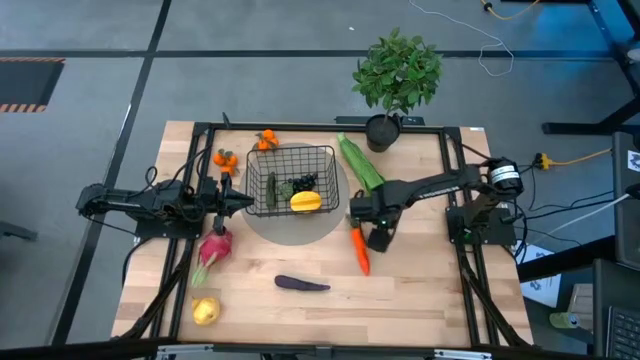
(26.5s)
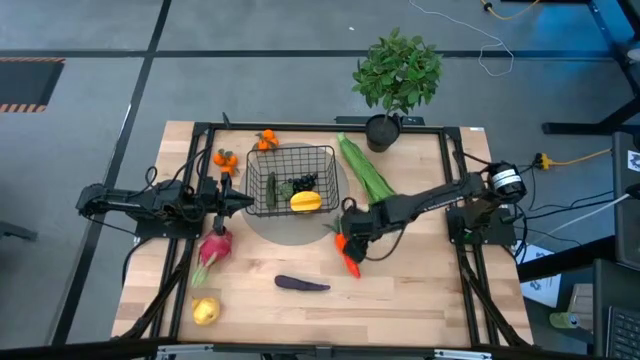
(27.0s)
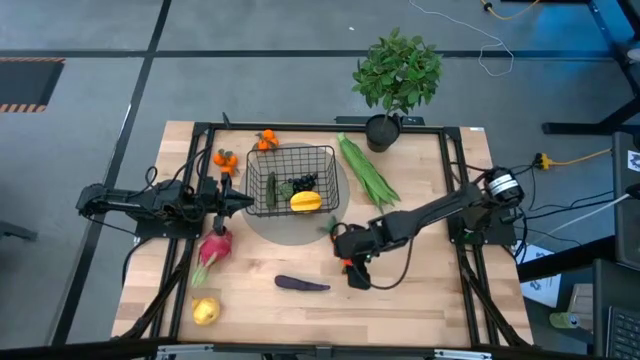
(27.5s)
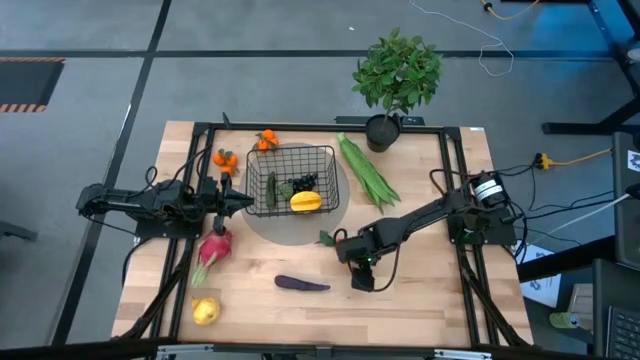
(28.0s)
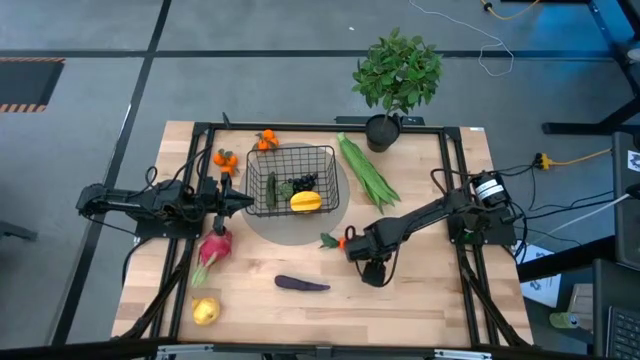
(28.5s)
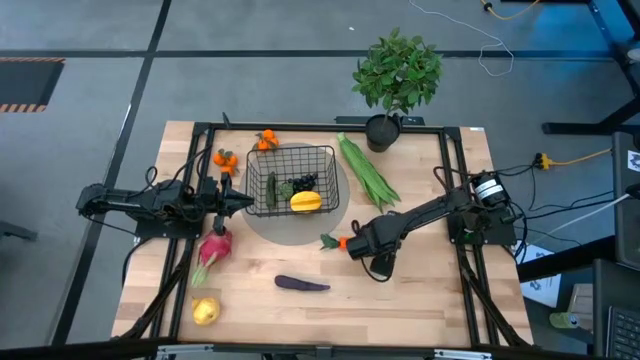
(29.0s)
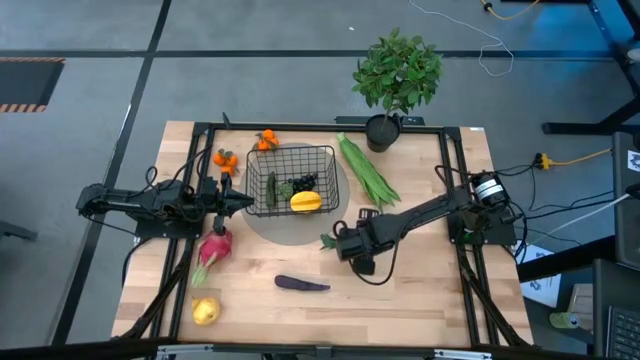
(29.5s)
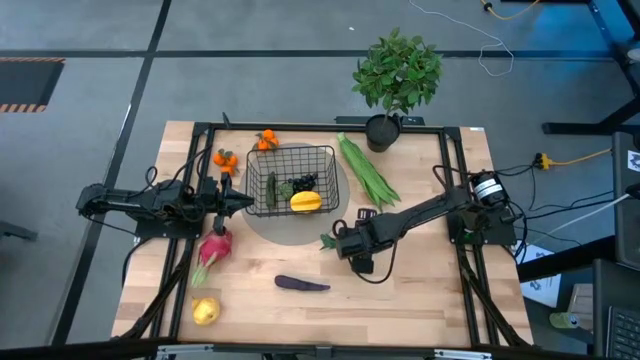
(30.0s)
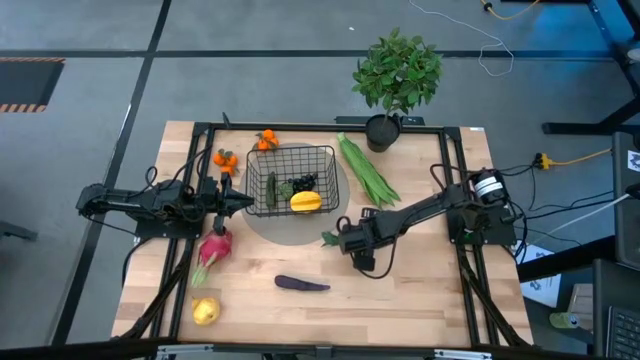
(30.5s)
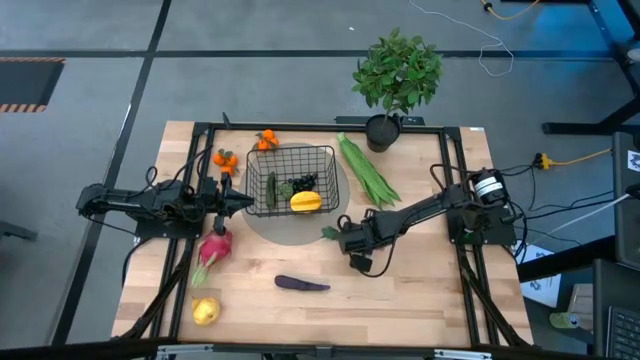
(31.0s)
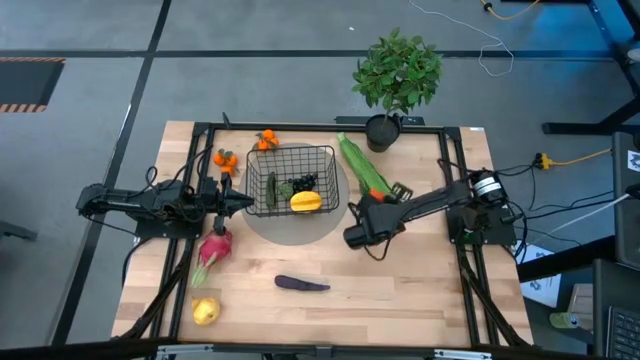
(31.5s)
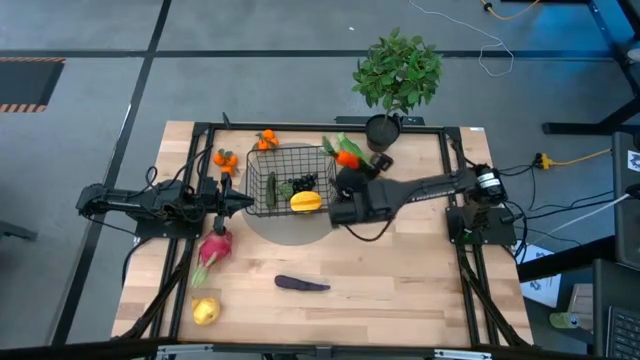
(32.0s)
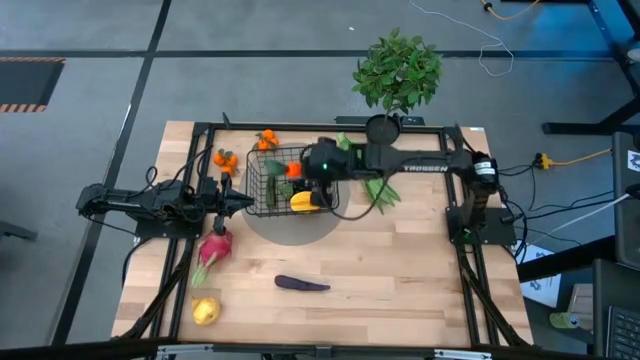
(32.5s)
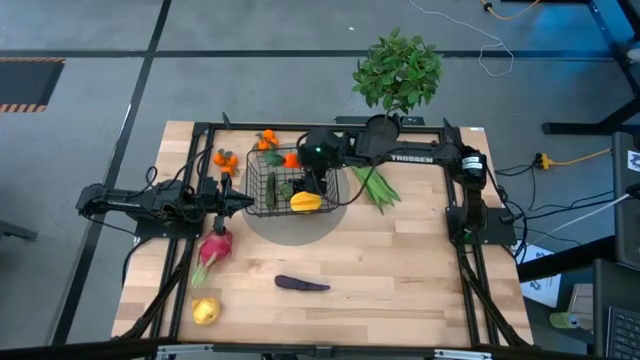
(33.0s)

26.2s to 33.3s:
Task: Build produce basket
Put the orange carrot into the black wire basket

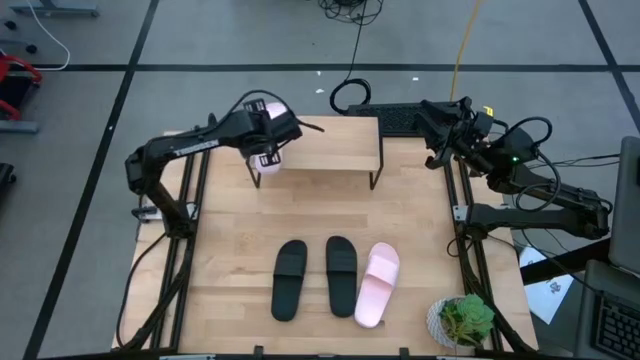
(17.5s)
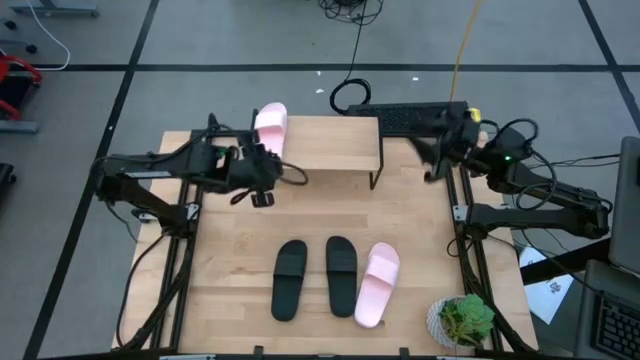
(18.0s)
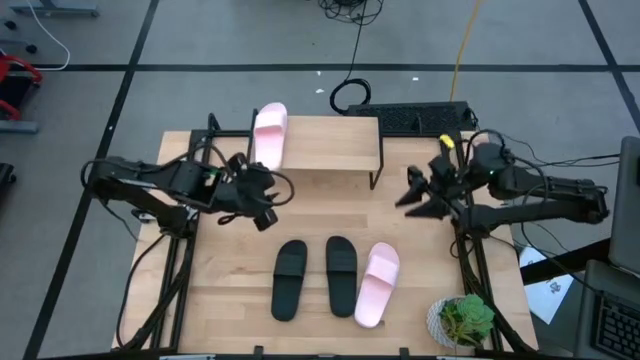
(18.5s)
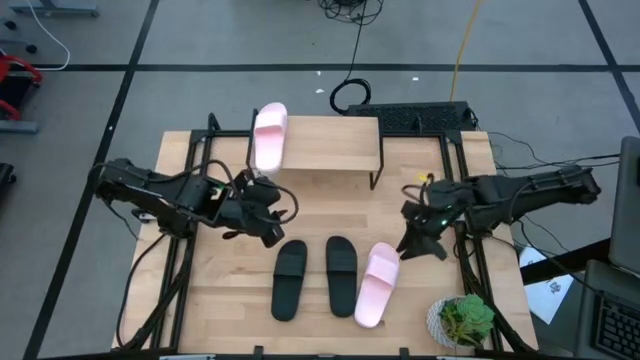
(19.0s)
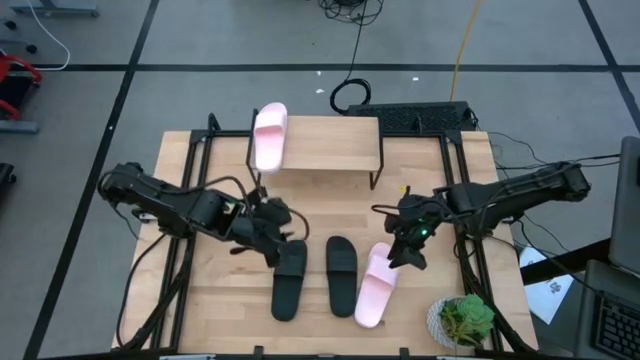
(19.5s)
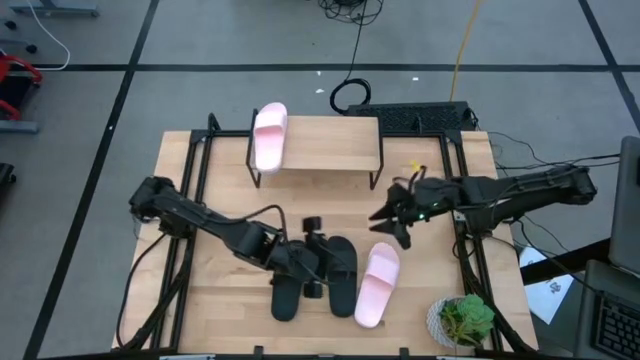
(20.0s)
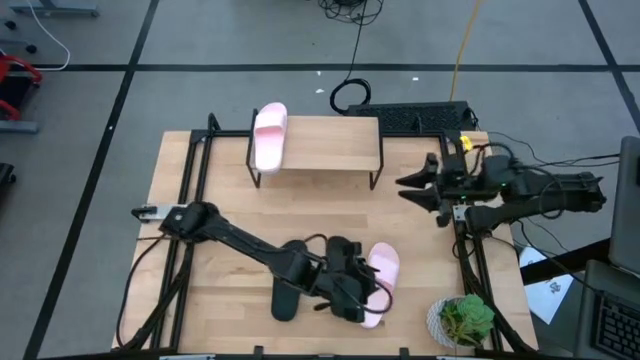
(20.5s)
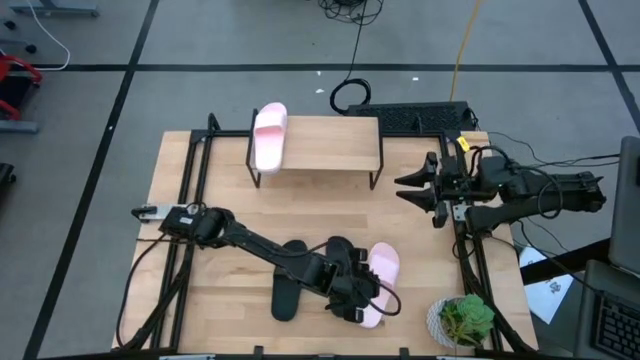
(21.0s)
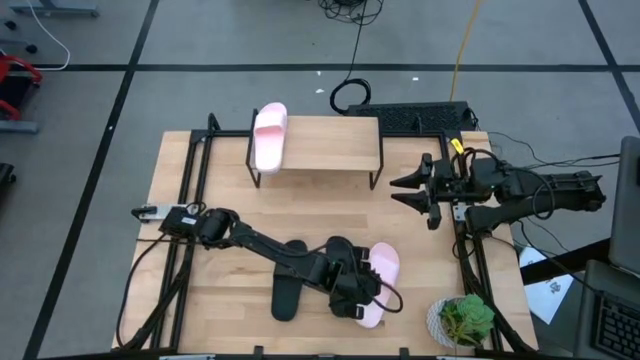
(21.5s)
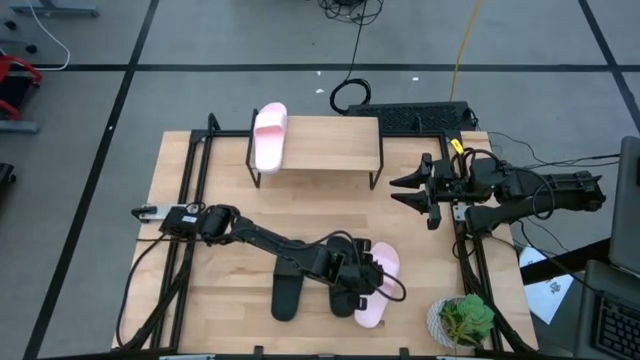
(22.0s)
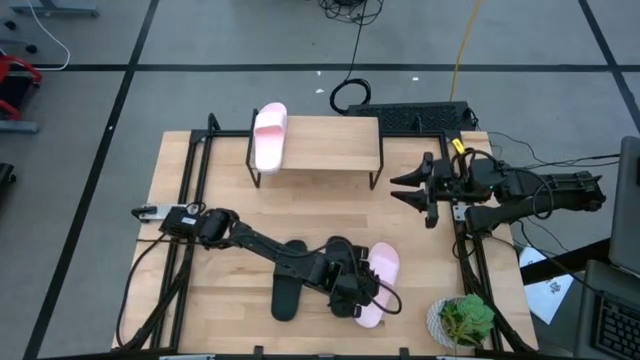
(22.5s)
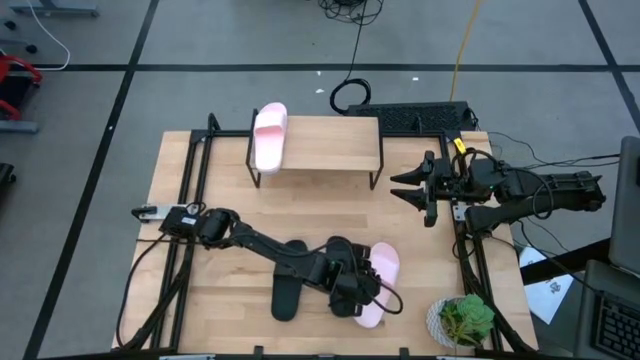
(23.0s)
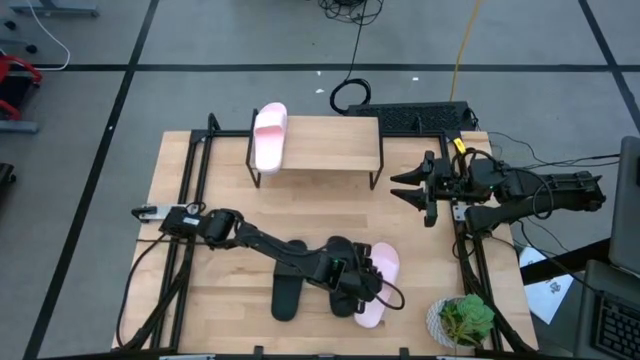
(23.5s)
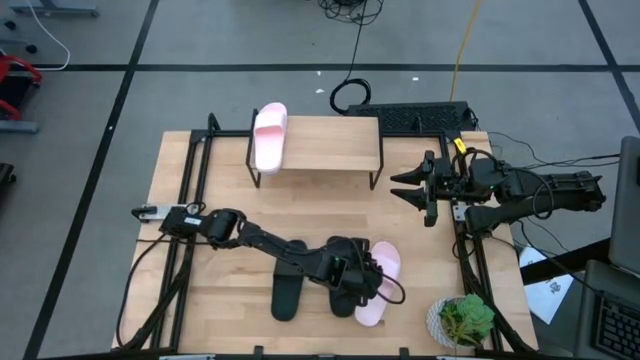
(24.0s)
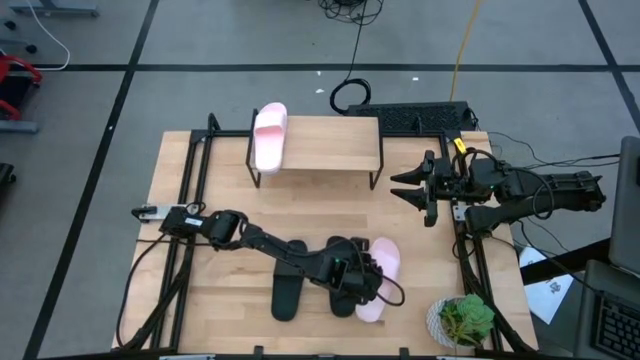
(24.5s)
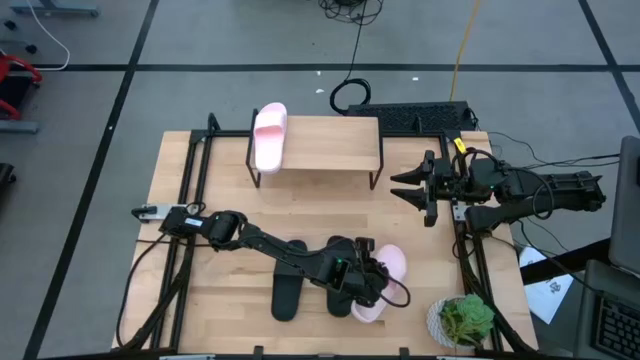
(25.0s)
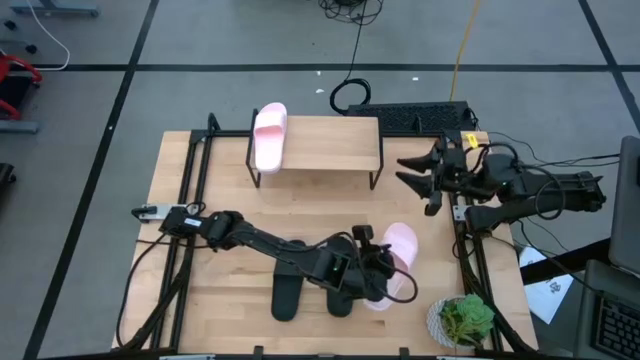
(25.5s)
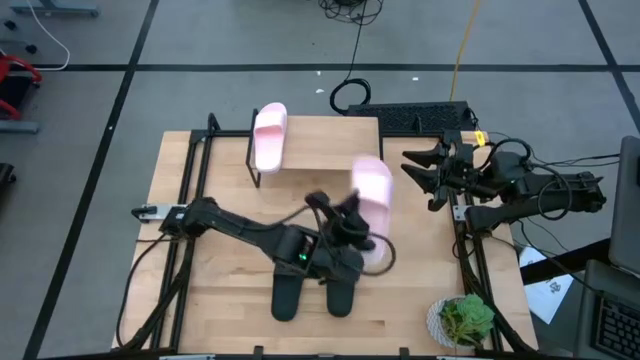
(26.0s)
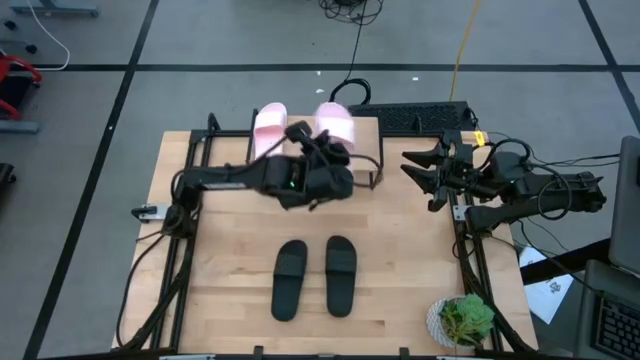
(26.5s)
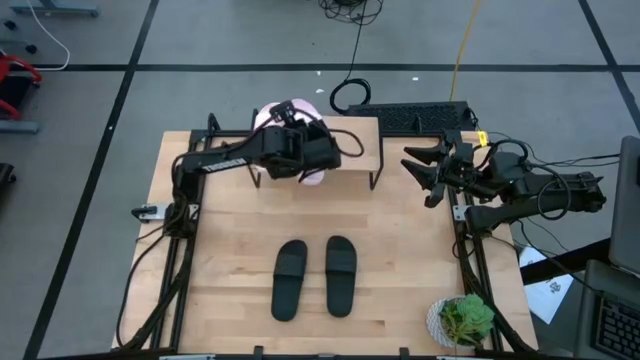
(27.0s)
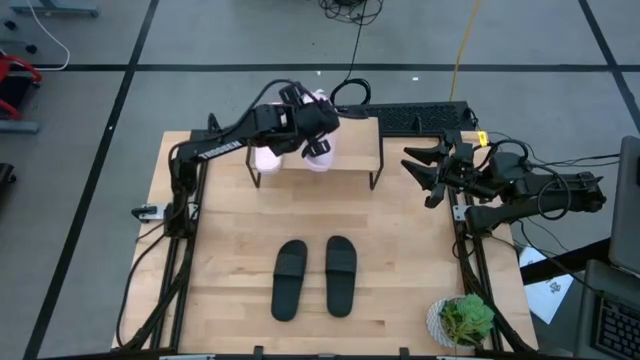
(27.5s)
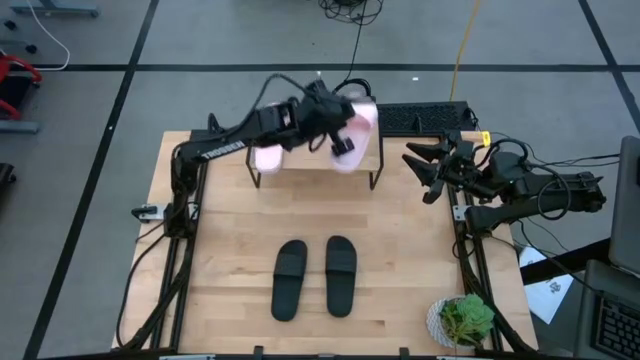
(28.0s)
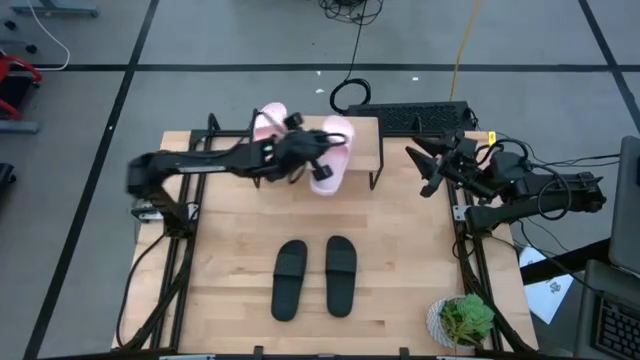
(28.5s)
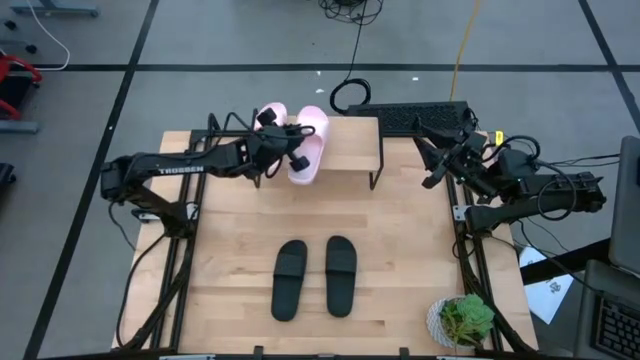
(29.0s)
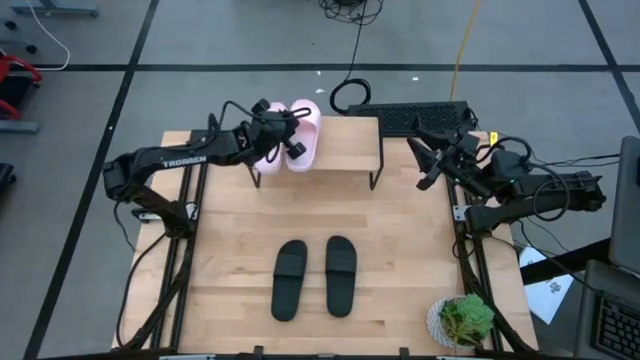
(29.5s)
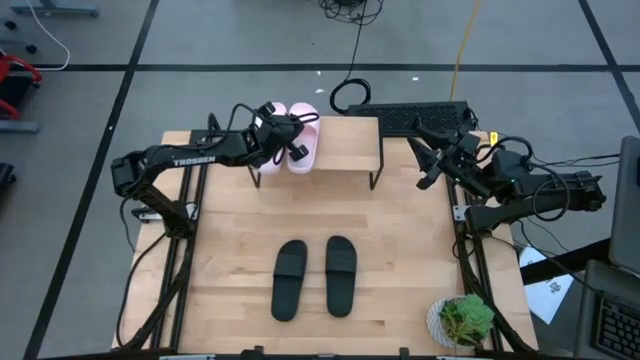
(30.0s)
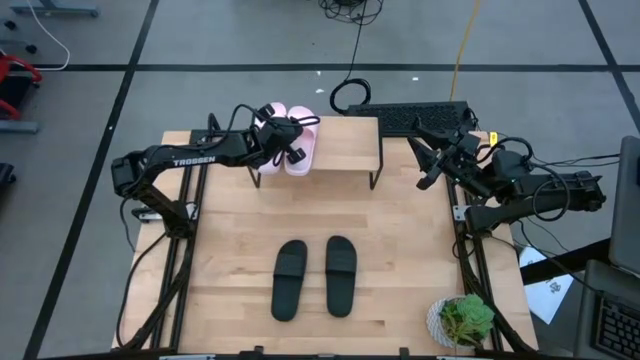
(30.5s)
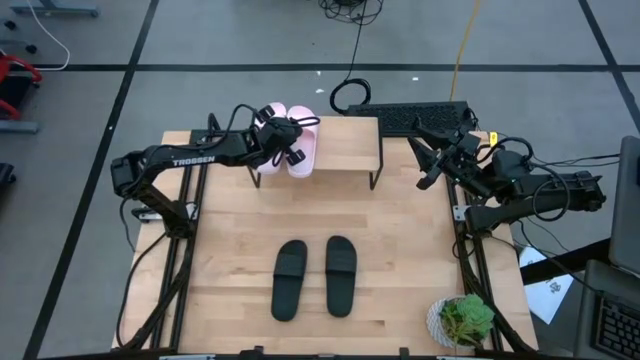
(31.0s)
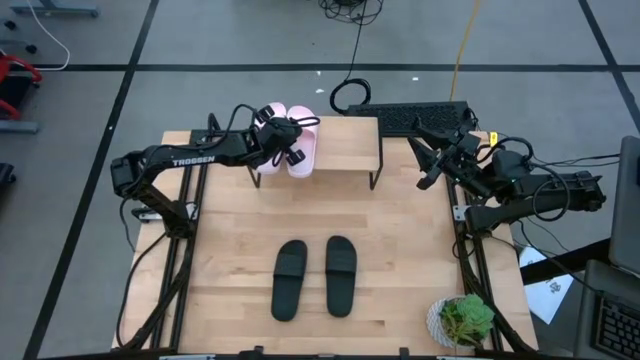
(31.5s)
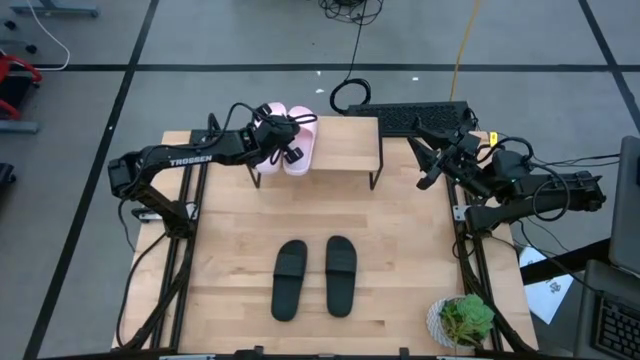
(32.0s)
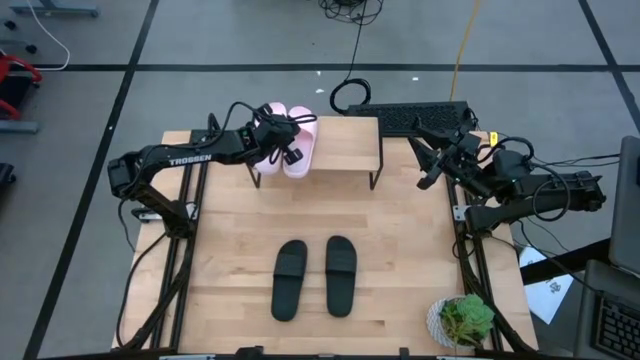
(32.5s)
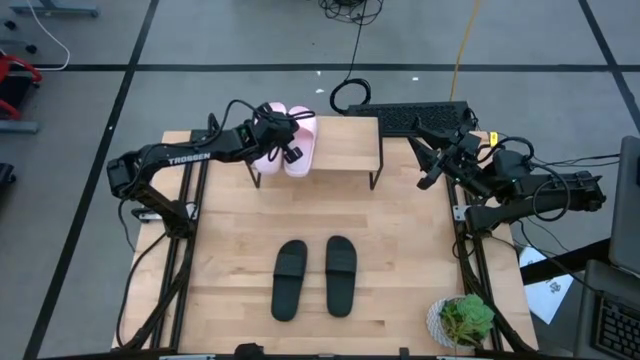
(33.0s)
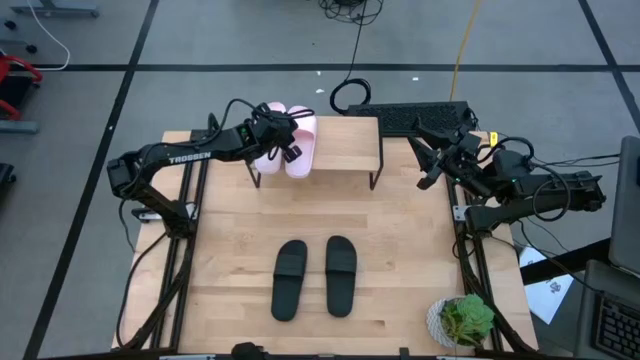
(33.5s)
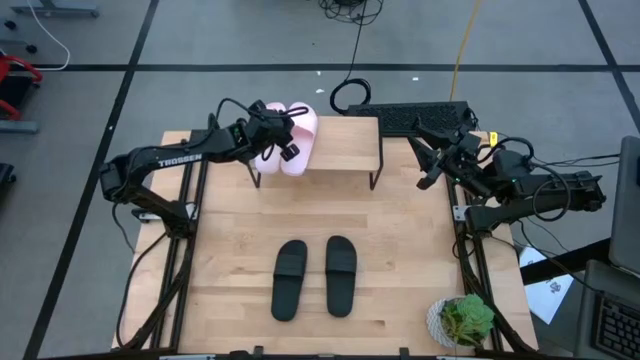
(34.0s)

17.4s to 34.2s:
Task: Pick and place slides into the shelf
Put the pink slide on the shelf
